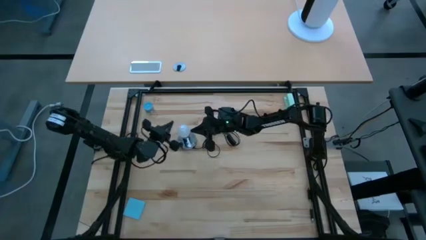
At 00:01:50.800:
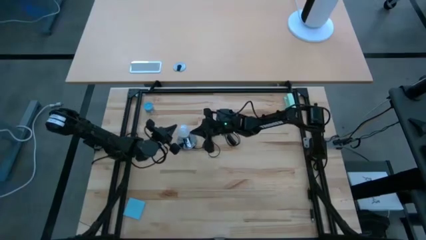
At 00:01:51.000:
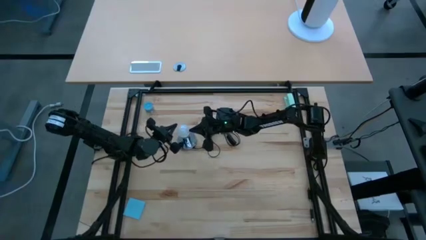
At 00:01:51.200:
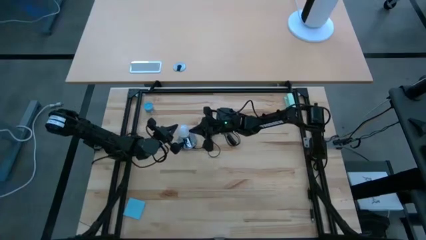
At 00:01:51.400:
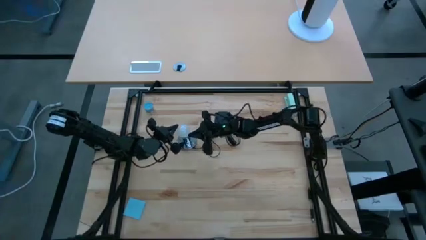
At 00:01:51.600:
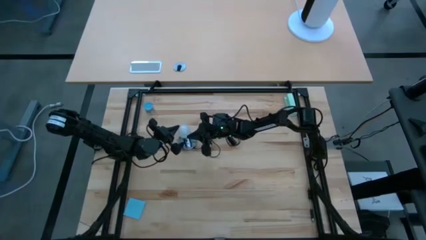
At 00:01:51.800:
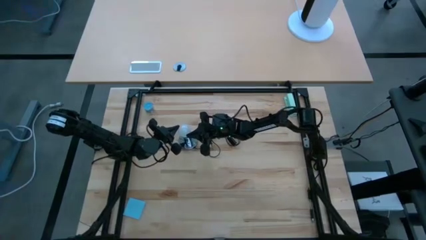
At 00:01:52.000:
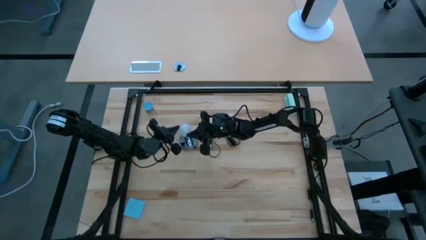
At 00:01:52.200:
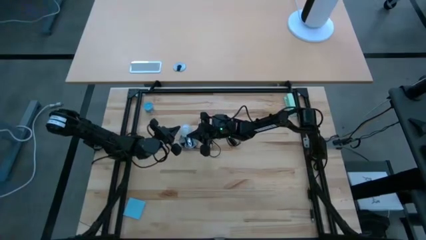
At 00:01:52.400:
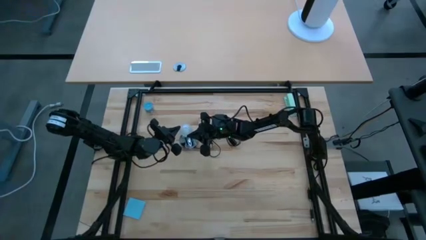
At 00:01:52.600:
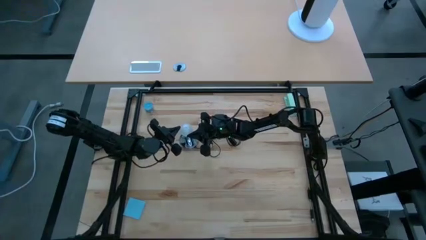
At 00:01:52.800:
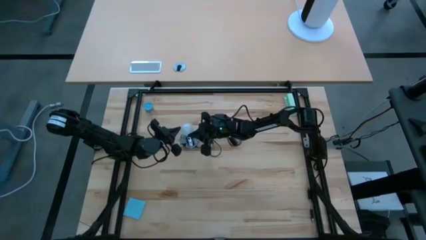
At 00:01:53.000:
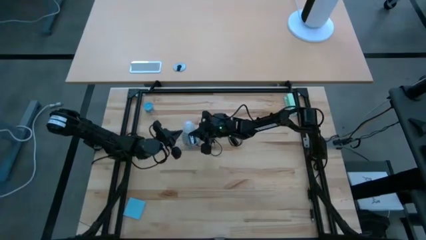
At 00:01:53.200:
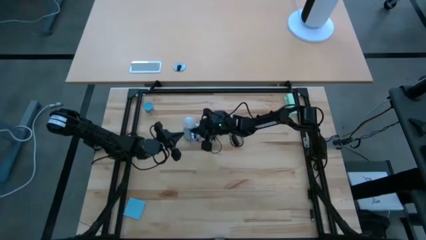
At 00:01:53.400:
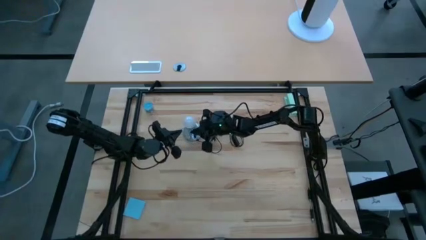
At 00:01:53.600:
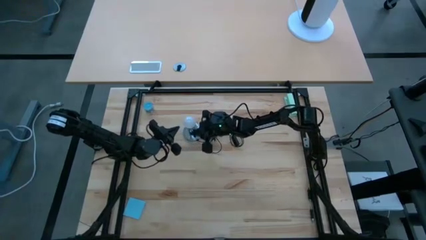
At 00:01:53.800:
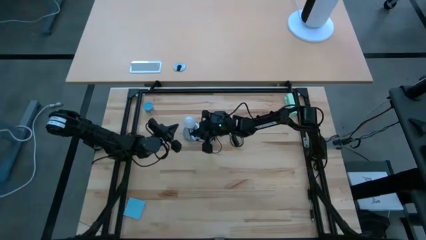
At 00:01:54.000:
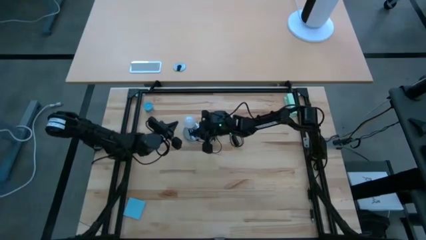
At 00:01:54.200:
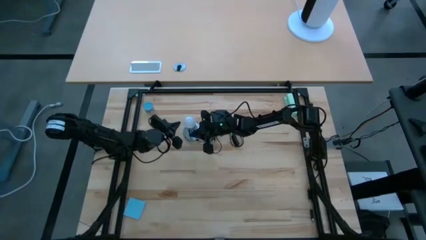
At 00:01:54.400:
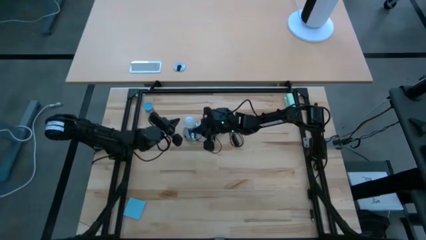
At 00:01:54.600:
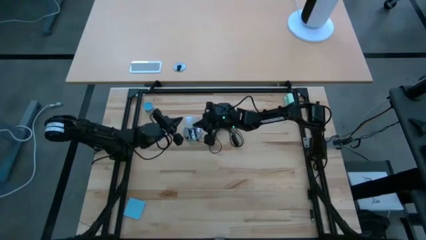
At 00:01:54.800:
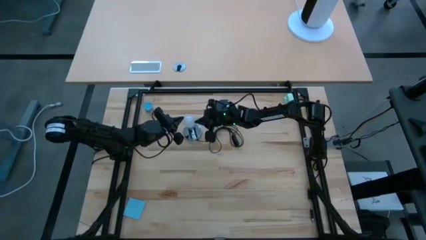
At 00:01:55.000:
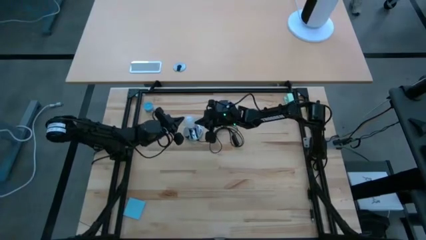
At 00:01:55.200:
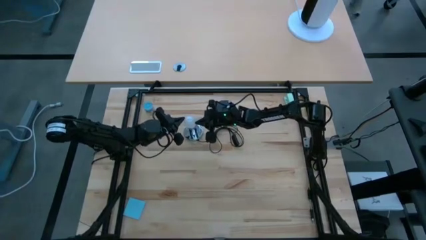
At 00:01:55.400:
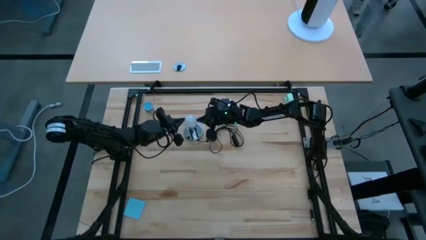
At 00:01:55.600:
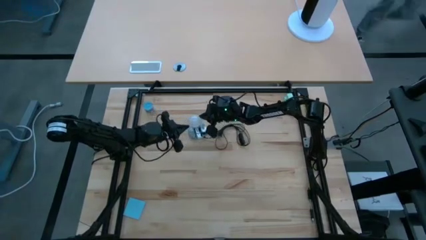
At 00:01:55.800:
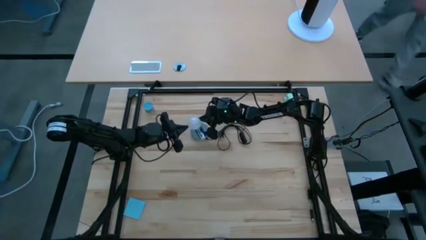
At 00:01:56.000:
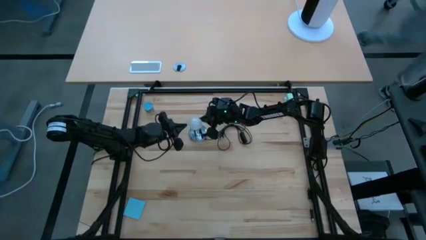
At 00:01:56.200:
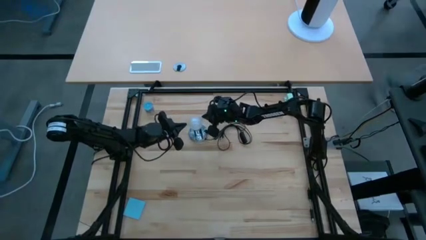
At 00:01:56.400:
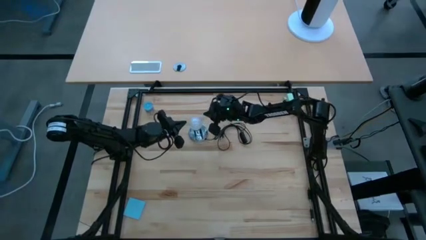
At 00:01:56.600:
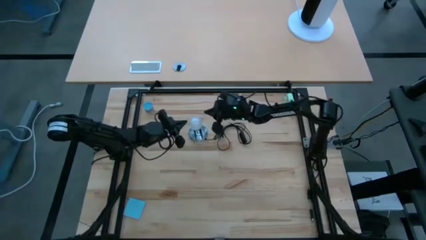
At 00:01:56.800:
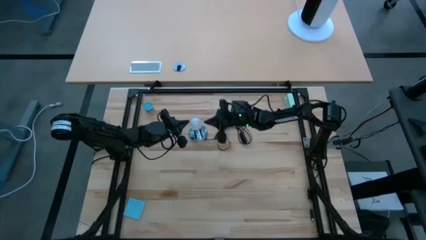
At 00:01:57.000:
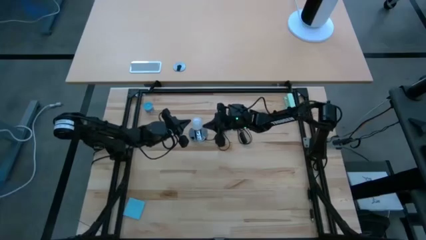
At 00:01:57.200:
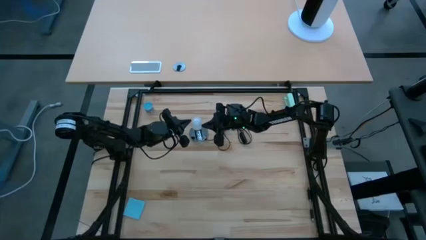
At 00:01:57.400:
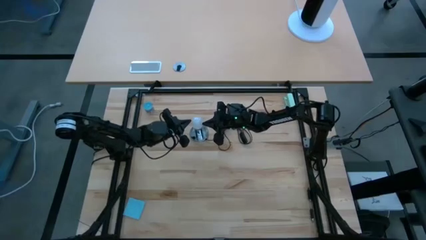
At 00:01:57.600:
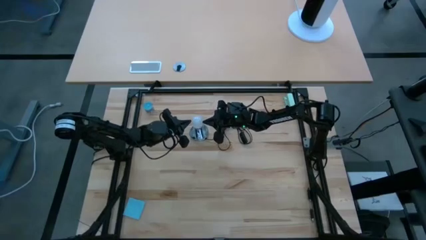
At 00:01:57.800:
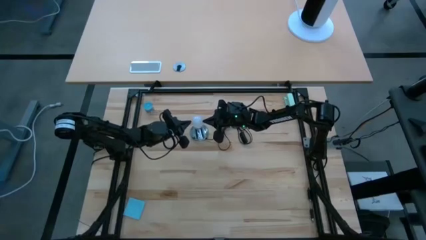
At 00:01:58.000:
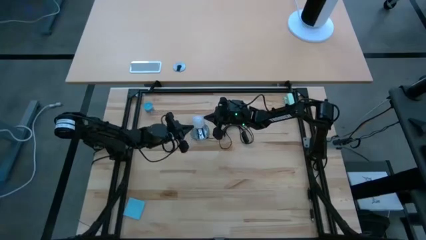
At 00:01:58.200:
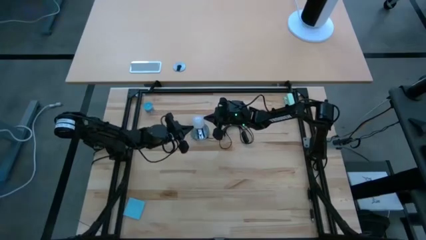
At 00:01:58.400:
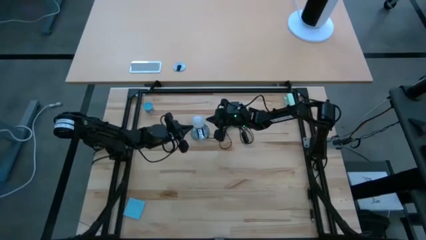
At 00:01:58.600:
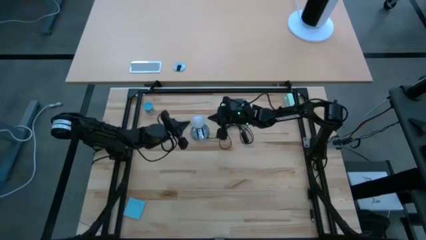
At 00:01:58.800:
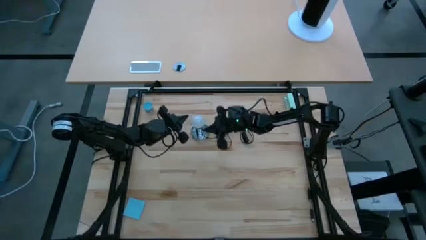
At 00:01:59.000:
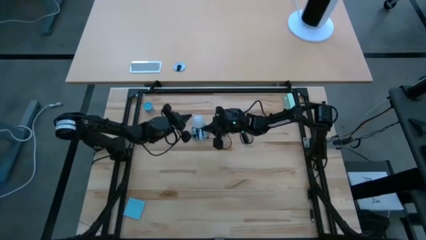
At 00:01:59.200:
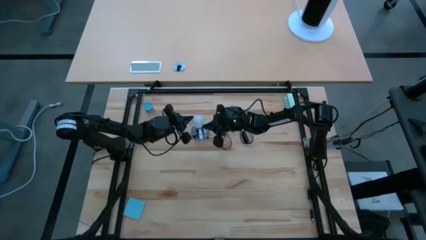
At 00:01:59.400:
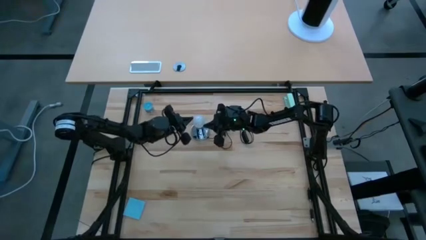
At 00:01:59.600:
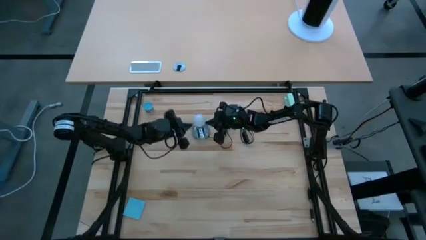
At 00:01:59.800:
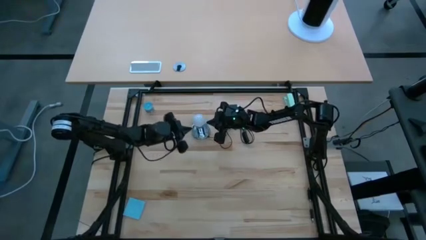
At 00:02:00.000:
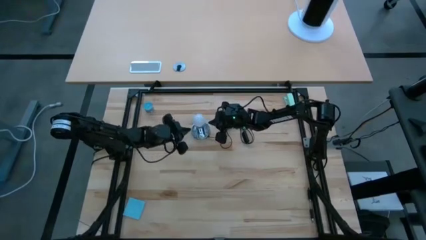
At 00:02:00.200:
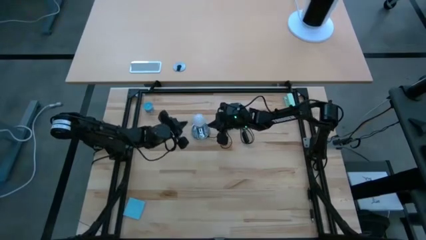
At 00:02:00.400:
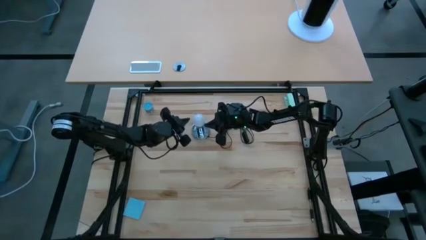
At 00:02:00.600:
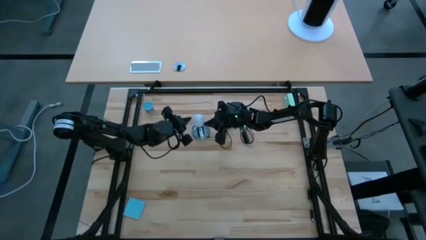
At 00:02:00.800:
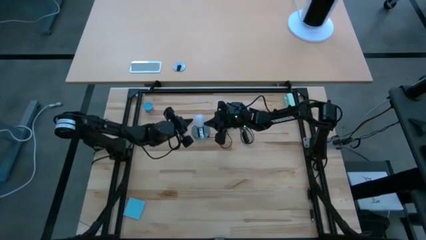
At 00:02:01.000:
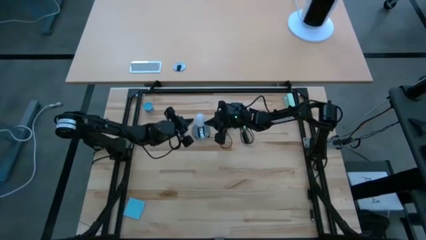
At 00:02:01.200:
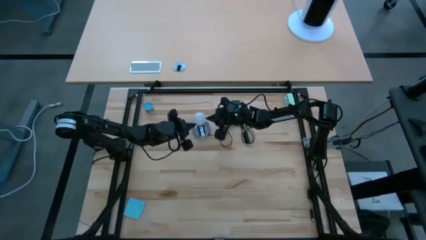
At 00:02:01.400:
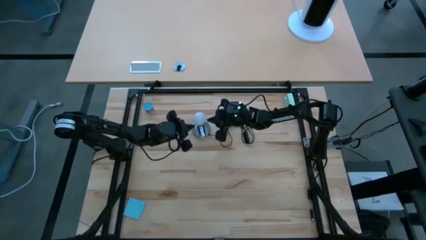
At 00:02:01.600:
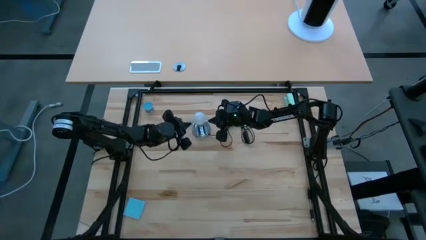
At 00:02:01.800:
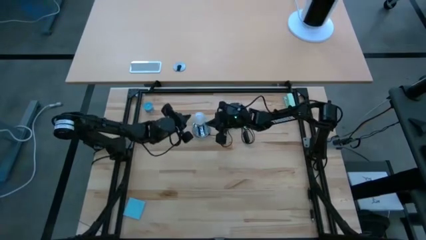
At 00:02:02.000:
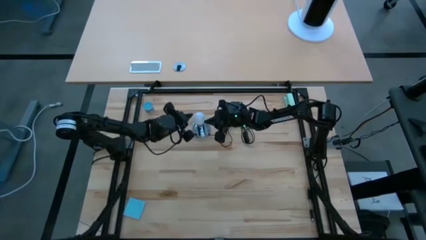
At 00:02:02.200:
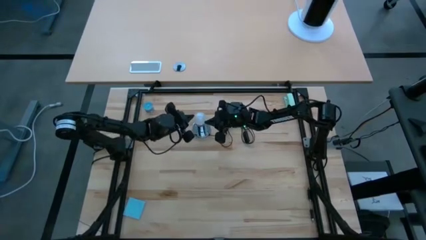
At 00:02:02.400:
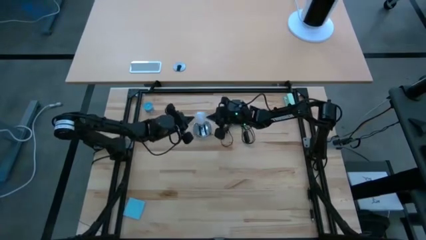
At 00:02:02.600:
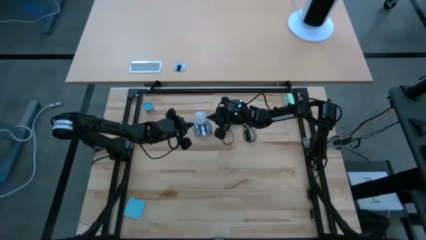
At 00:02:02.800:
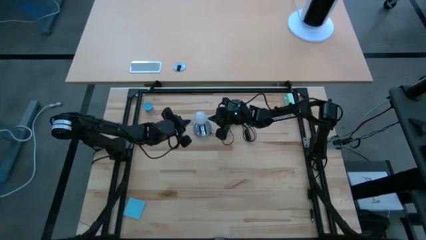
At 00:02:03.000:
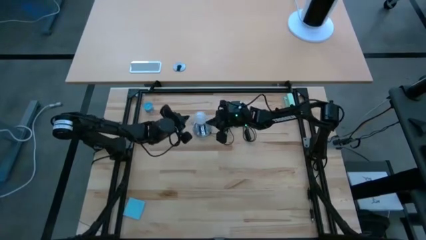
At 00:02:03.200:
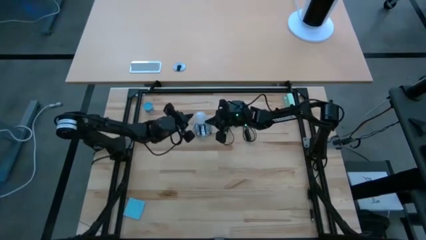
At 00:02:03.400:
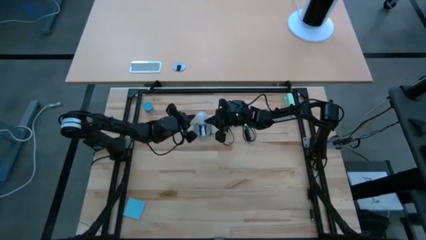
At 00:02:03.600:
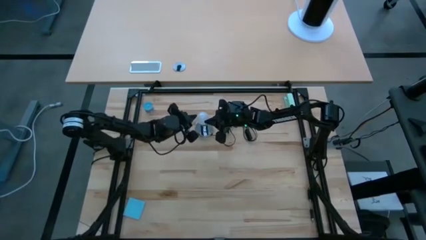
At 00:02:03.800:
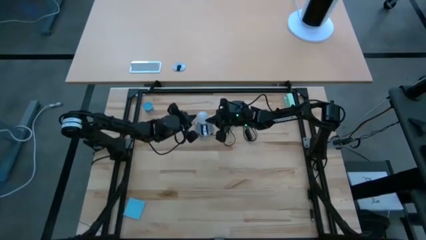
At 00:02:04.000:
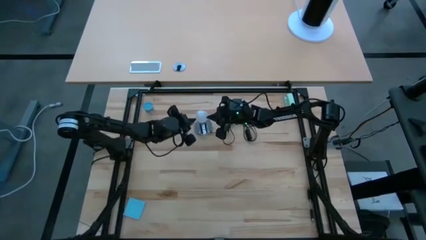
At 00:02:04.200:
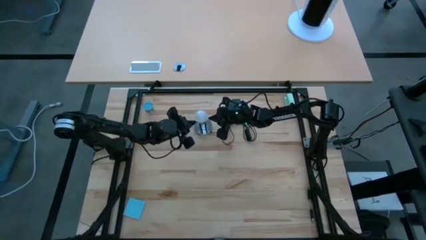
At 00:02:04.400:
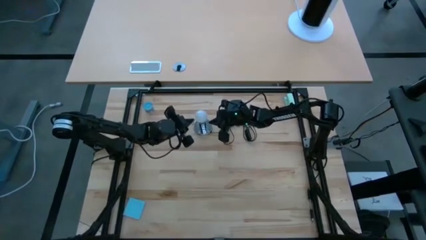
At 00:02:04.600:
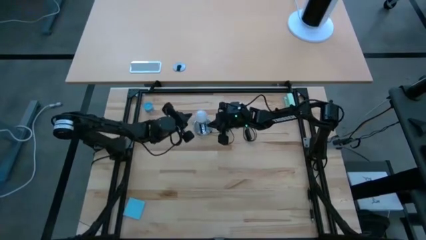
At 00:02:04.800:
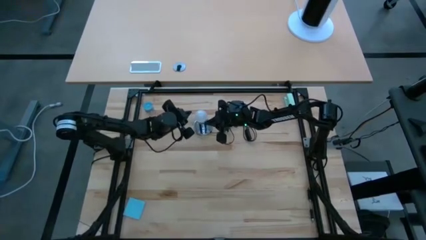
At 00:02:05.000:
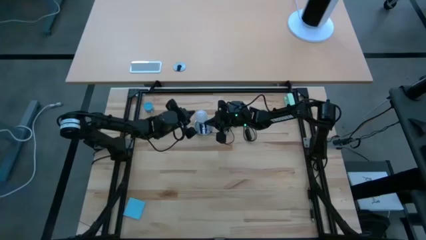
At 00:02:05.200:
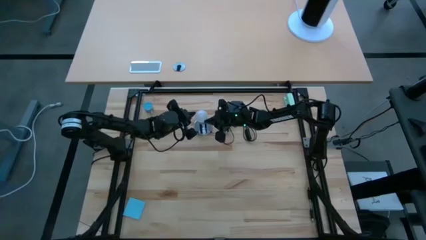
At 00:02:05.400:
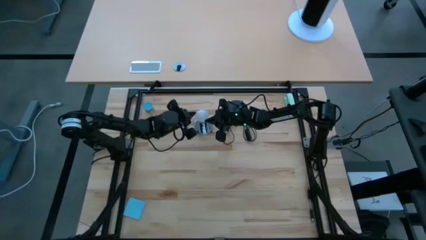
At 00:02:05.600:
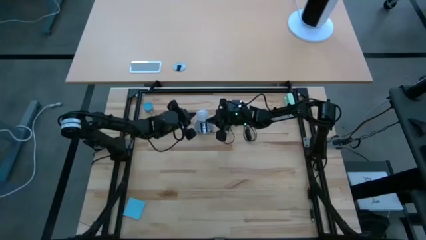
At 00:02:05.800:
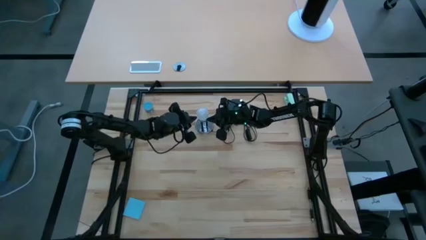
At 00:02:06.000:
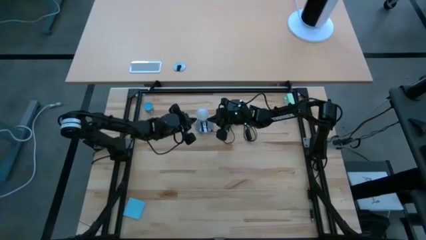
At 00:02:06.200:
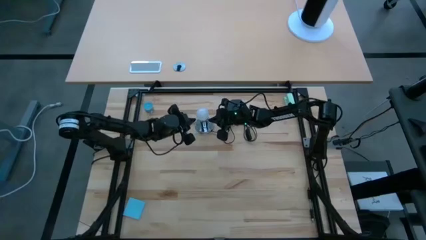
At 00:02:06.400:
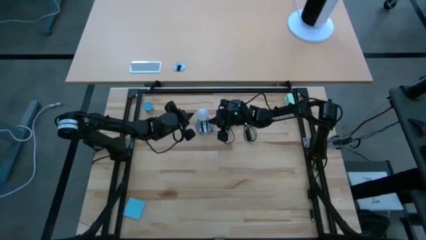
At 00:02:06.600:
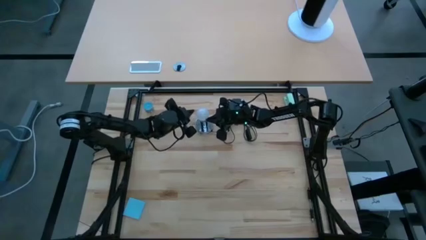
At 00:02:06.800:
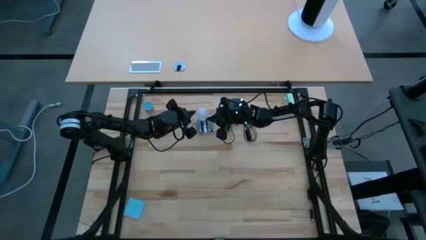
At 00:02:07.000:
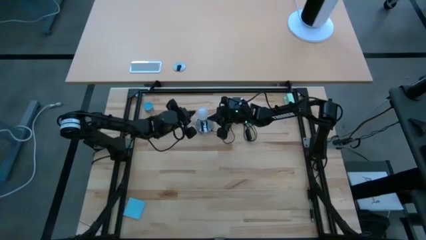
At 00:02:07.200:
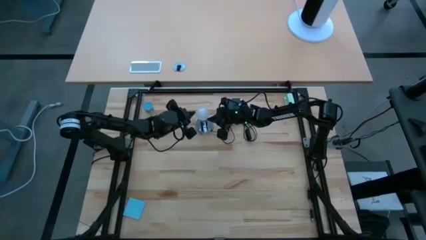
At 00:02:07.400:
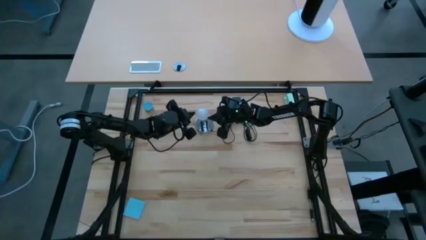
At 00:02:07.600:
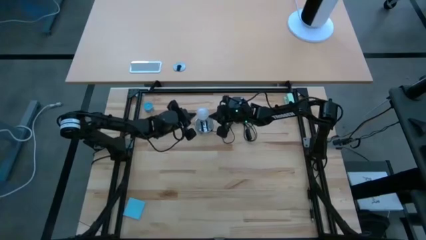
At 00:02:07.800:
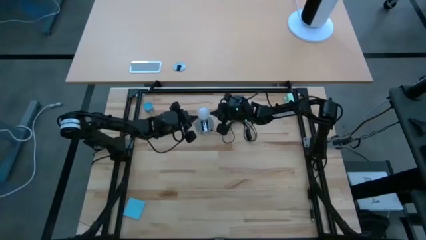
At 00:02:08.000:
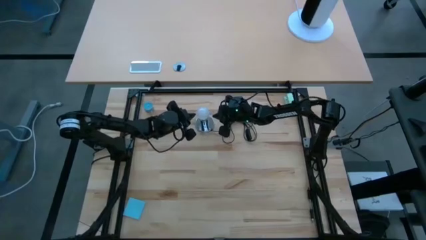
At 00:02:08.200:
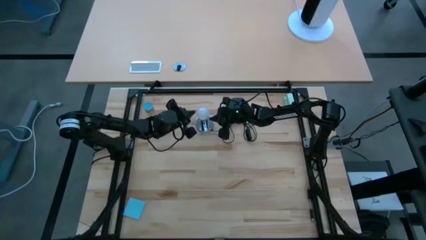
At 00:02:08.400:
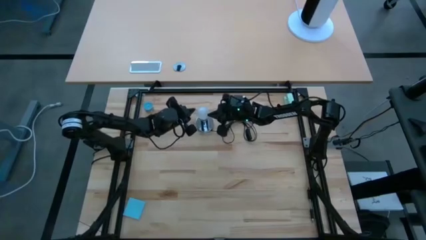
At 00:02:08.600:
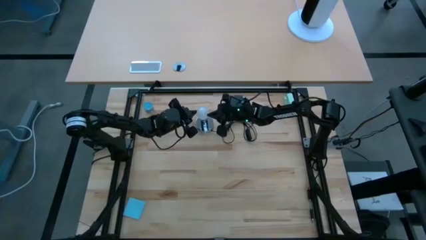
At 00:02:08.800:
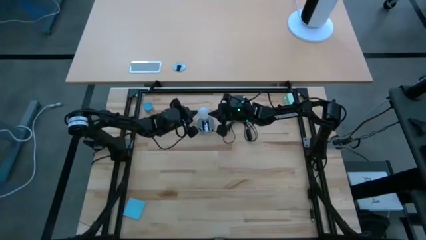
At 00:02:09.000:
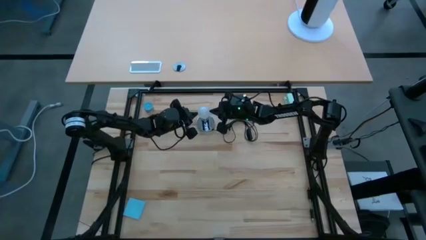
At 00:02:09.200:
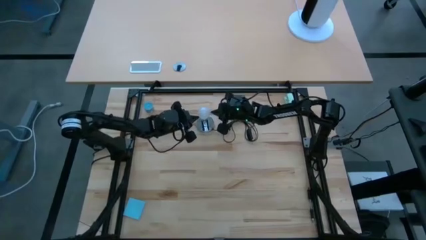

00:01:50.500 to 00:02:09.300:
Task: Screw lightbulb
Remove the lightbulb from the lamp
